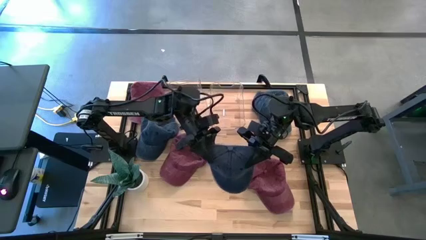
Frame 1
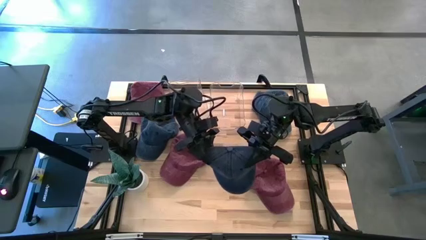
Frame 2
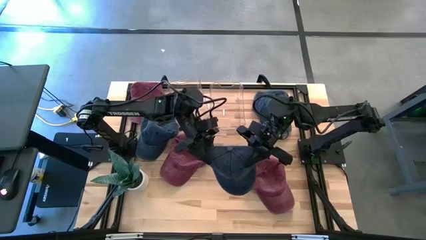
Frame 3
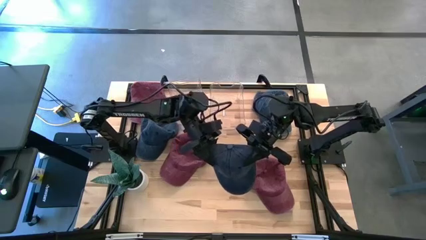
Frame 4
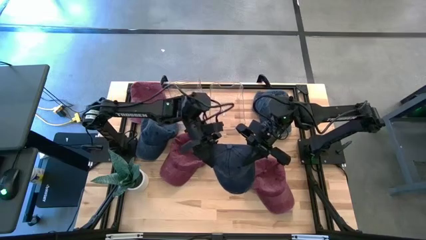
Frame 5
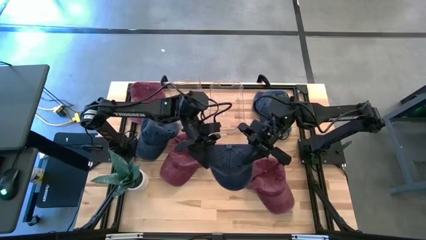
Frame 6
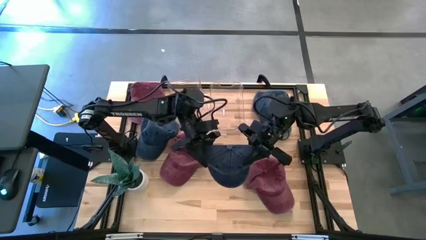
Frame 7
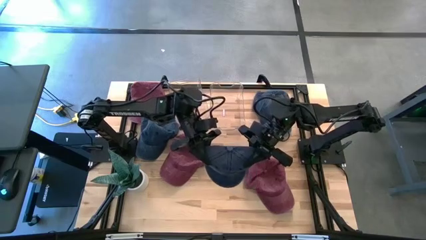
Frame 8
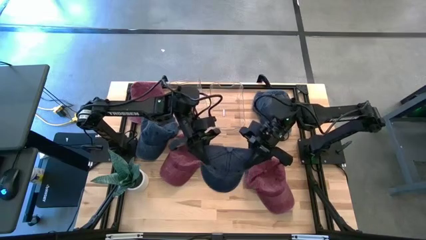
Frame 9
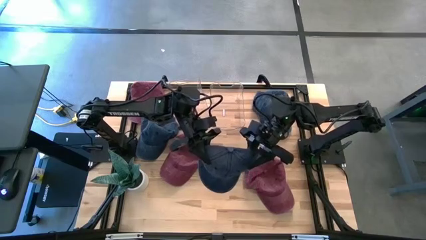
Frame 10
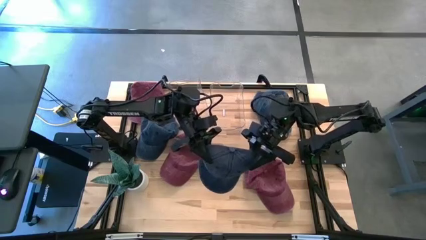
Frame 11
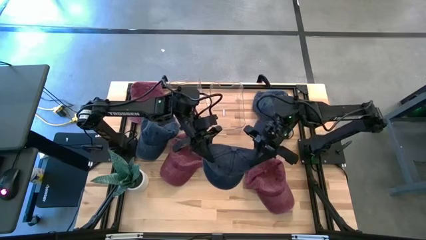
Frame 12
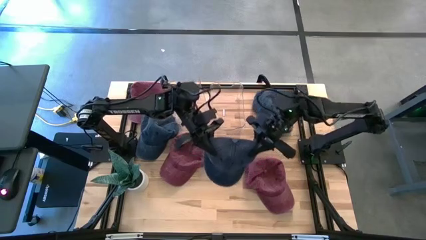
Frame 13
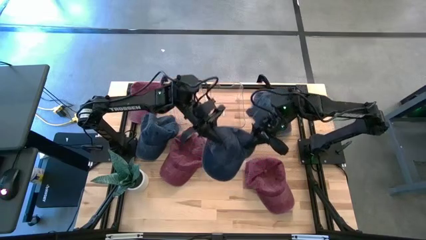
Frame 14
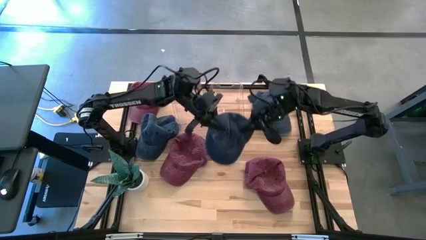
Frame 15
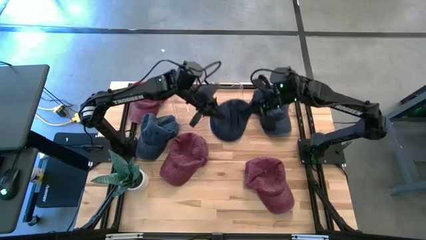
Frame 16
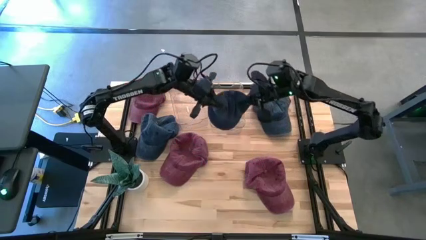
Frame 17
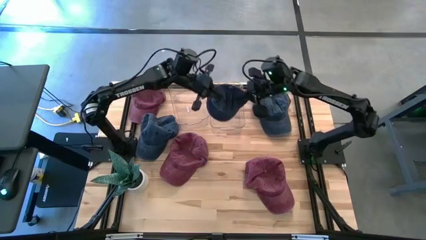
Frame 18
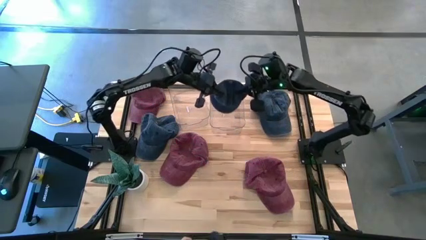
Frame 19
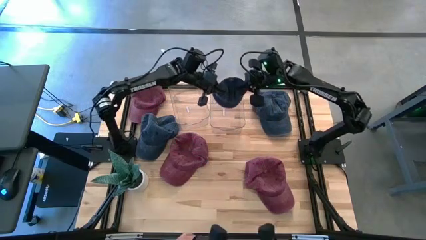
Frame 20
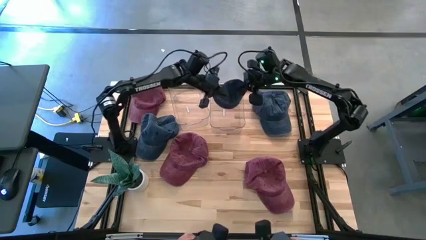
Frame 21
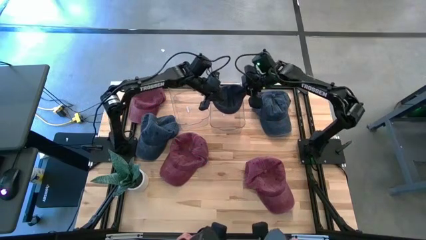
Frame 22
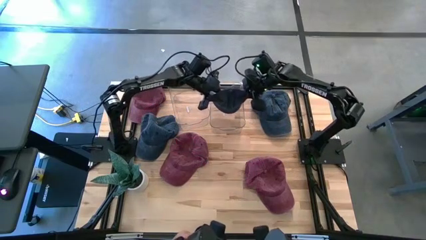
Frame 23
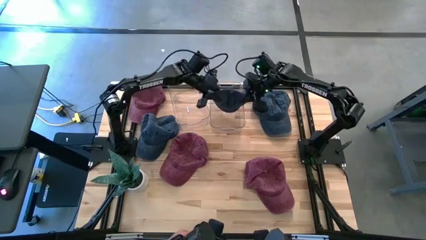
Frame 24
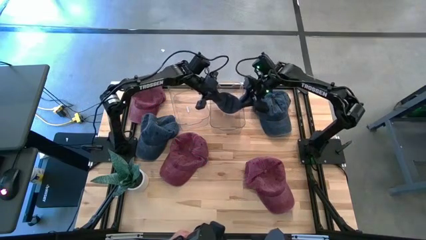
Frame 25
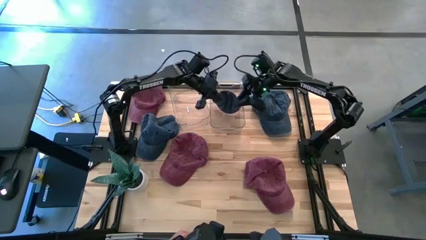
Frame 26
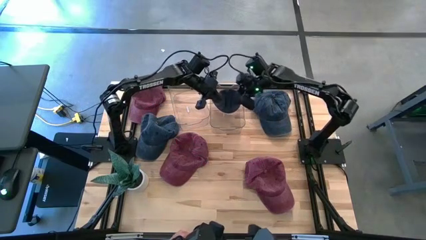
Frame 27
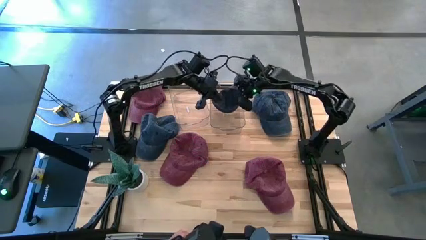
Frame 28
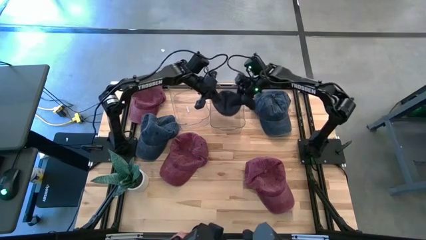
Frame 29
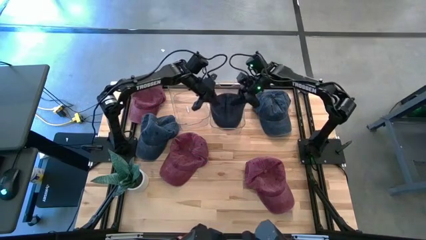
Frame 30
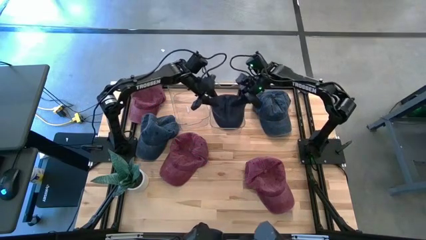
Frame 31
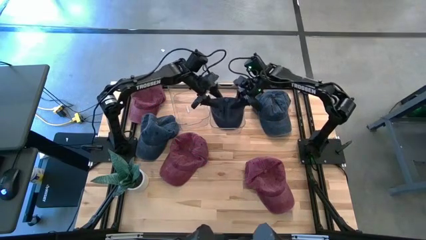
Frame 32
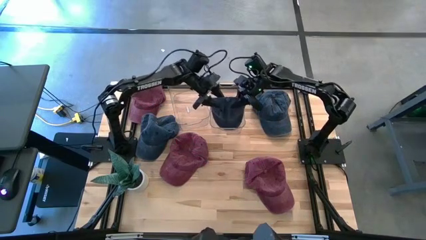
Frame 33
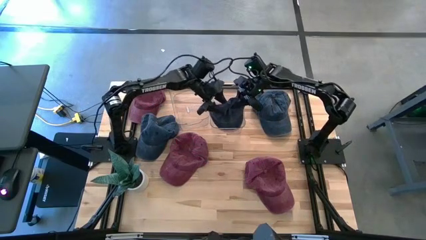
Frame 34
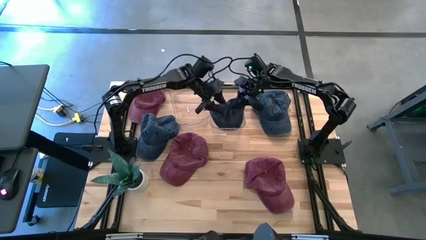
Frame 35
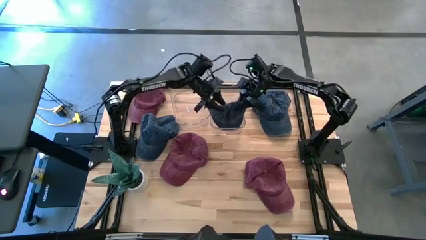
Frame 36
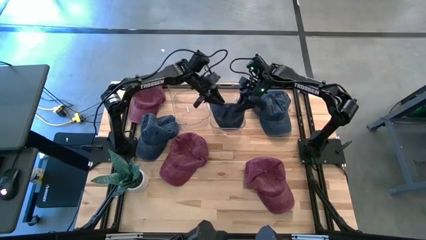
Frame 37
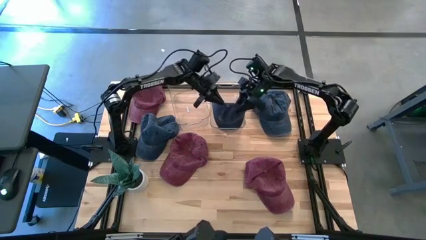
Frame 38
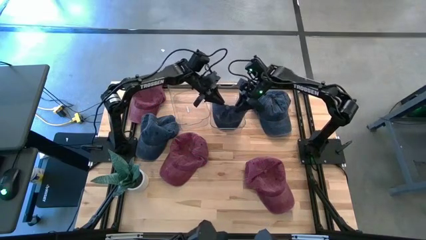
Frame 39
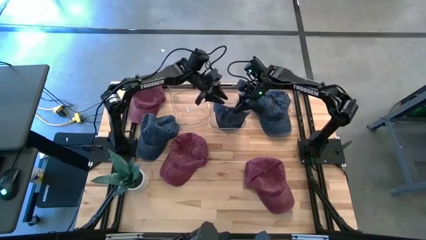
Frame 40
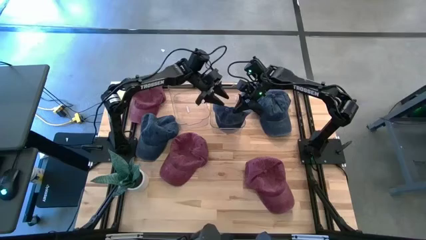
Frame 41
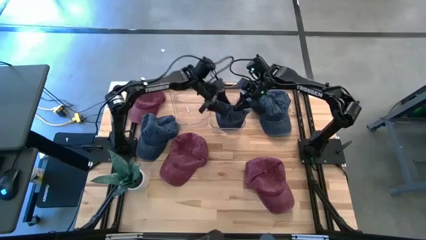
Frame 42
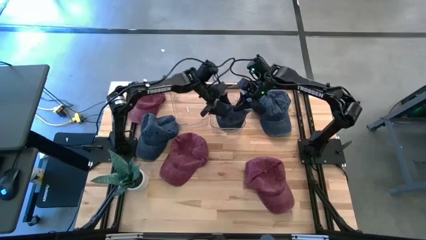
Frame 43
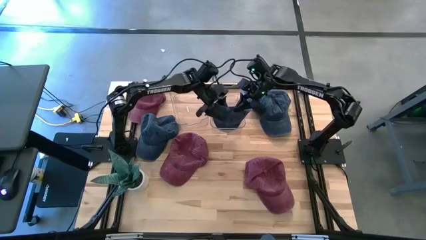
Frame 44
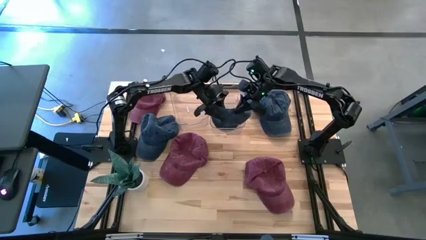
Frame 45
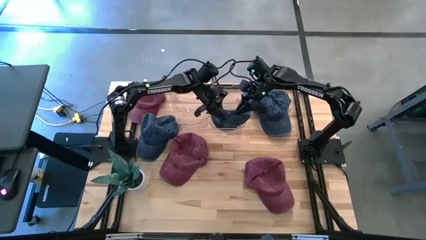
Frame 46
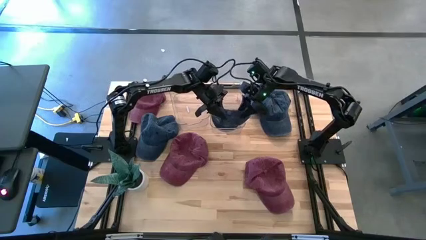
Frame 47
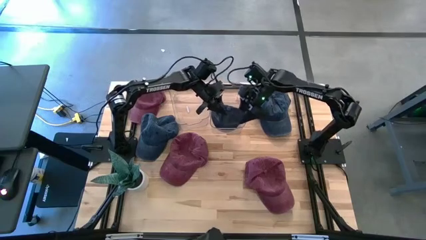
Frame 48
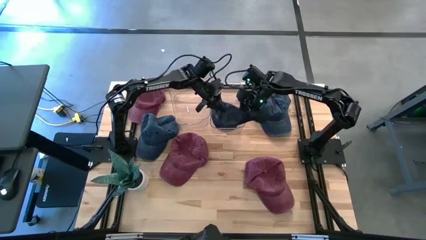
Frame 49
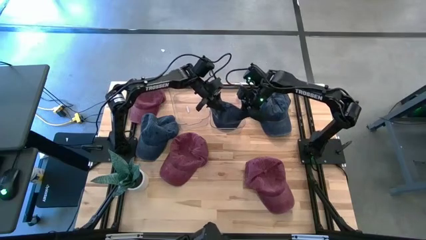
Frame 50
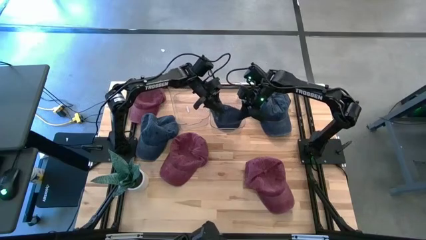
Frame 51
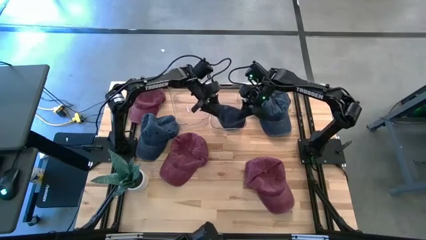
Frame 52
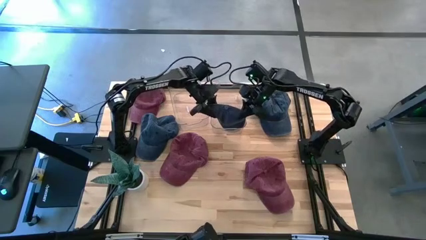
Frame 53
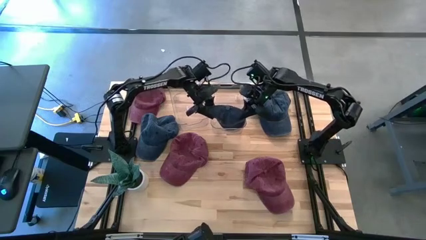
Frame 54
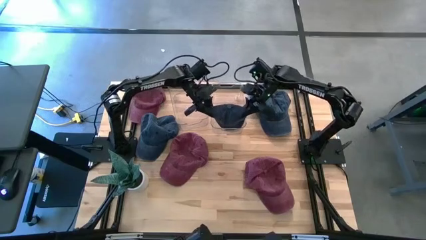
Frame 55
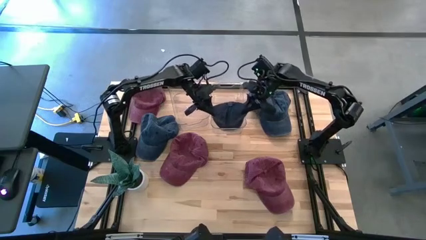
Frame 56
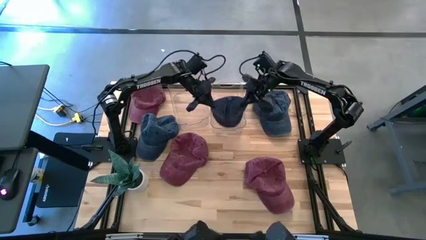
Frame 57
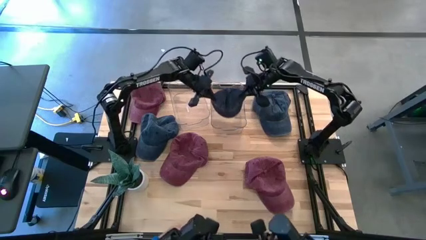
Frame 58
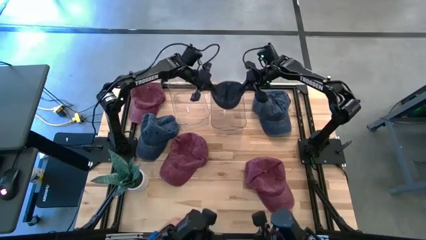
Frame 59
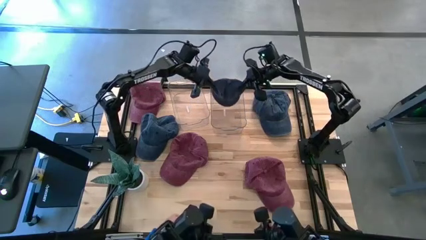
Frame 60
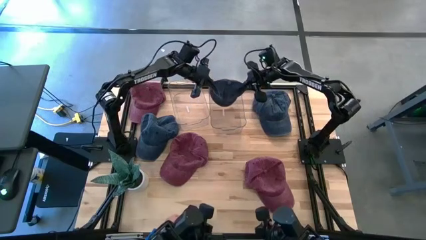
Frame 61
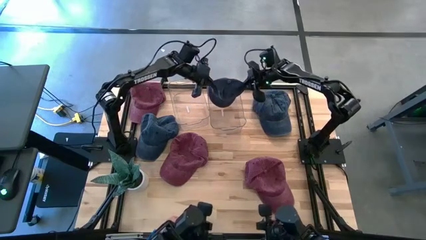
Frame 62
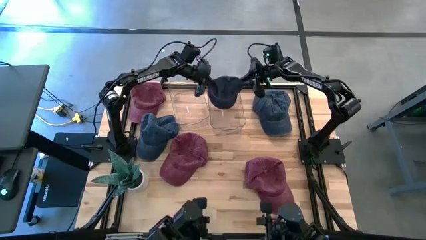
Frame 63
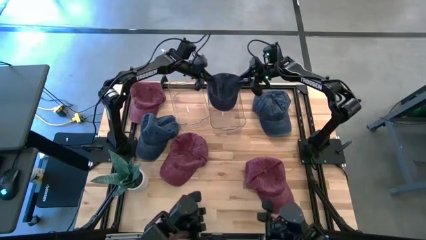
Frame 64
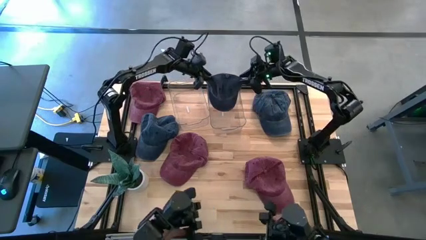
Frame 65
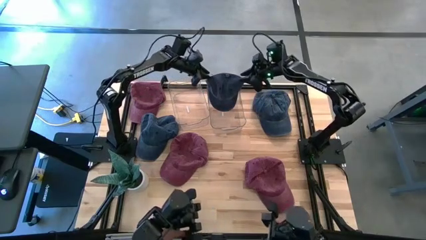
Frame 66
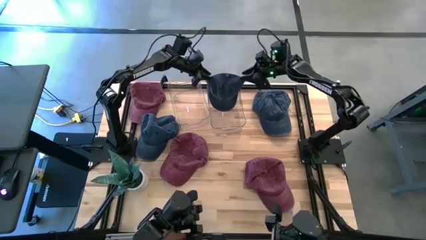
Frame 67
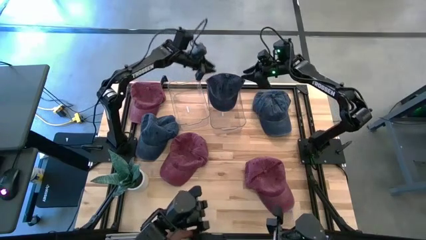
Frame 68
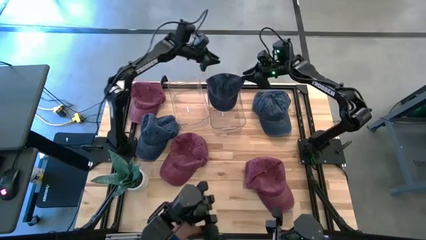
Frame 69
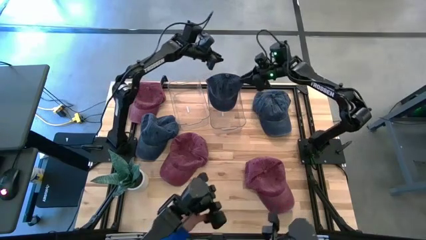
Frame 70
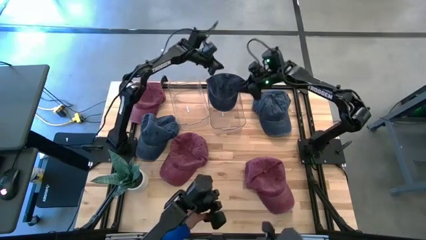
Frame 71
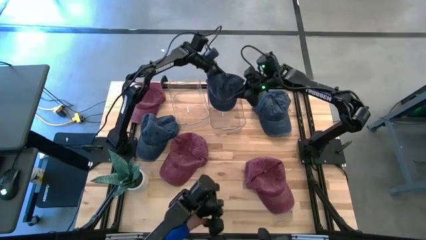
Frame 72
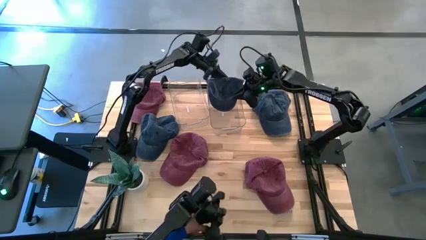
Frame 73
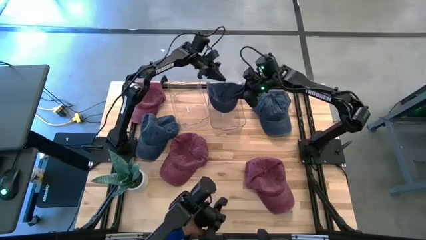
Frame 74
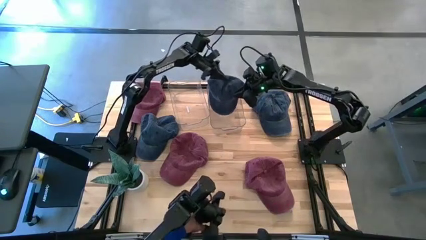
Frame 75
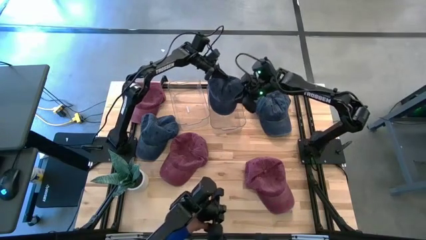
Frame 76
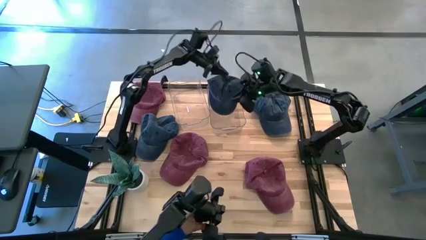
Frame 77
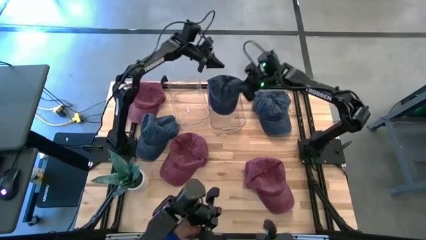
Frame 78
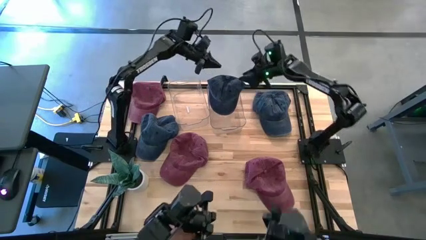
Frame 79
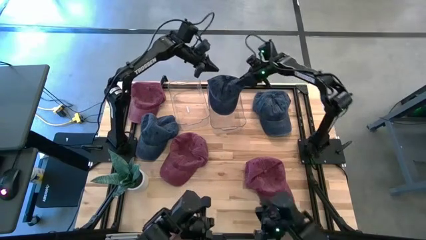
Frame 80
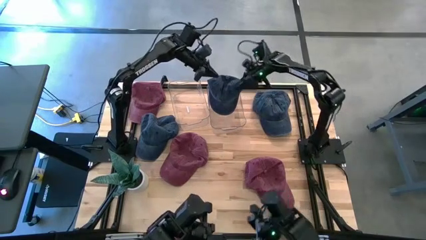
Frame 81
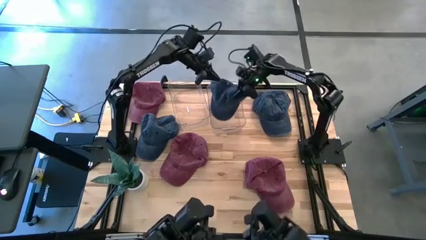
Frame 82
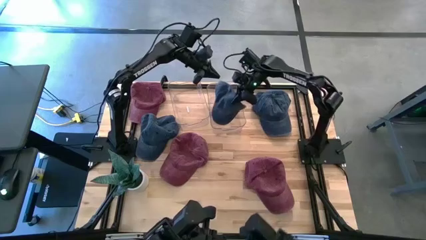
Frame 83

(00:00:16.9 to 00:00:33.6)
Task: Pick & Place hat
Put the bottom blue cap into the right bin
